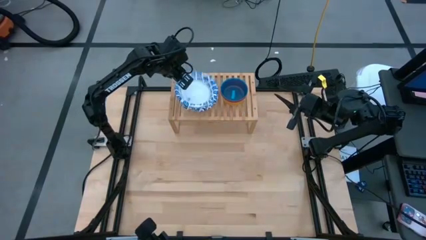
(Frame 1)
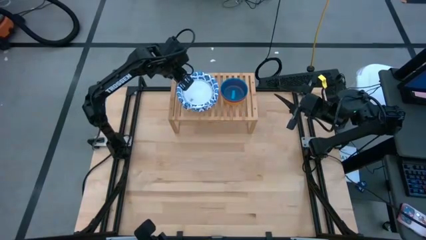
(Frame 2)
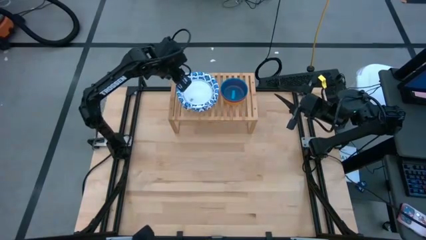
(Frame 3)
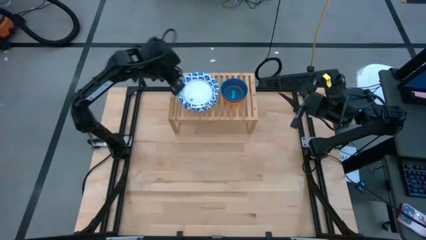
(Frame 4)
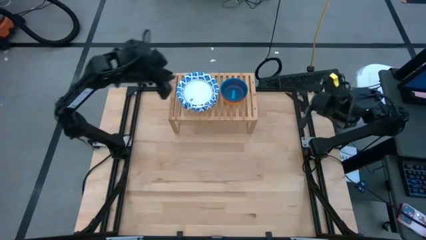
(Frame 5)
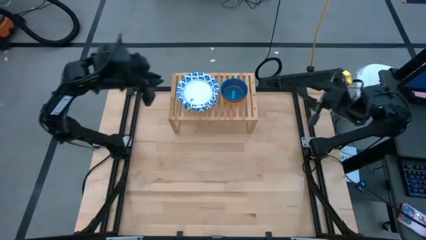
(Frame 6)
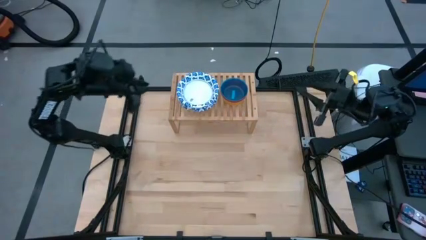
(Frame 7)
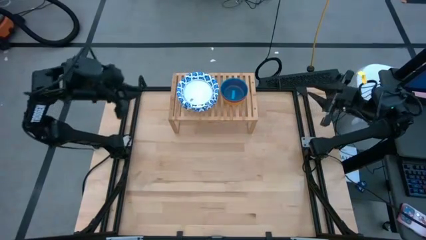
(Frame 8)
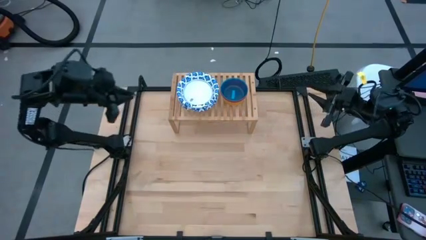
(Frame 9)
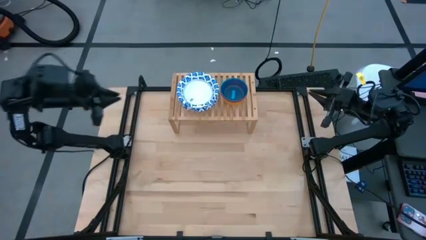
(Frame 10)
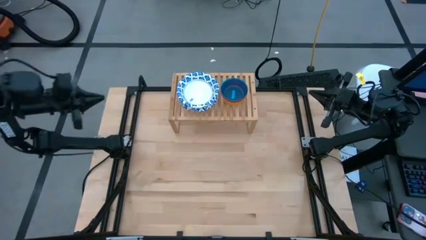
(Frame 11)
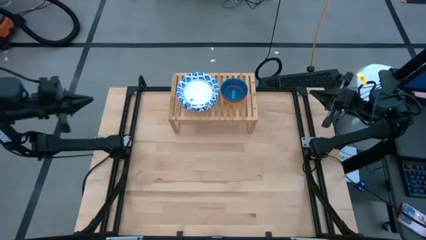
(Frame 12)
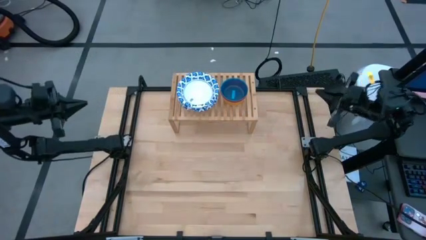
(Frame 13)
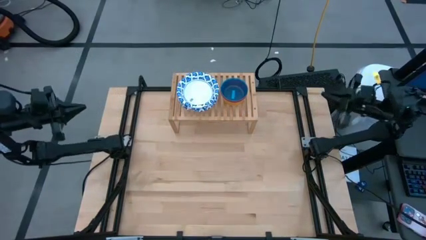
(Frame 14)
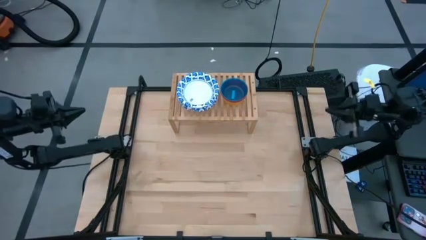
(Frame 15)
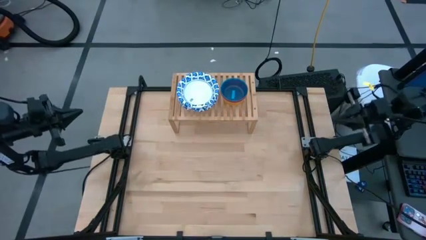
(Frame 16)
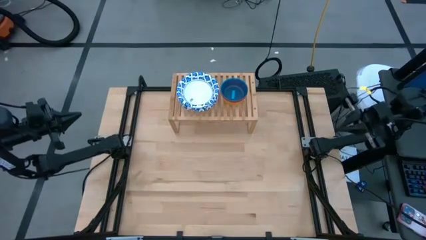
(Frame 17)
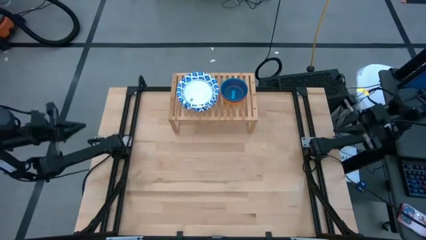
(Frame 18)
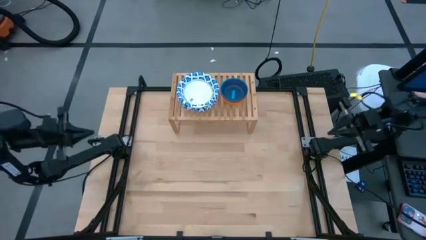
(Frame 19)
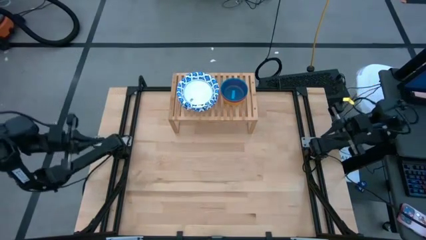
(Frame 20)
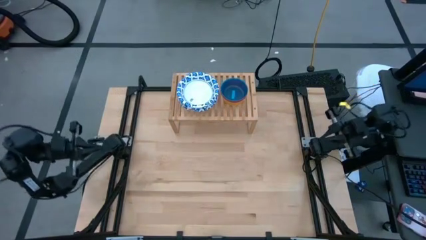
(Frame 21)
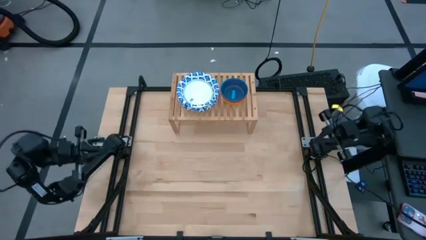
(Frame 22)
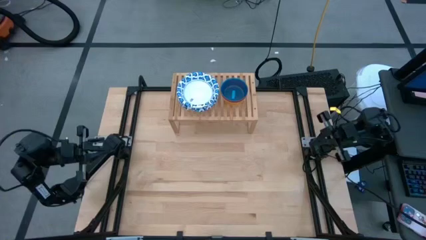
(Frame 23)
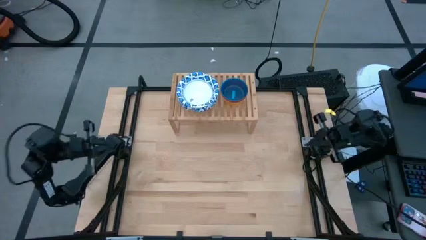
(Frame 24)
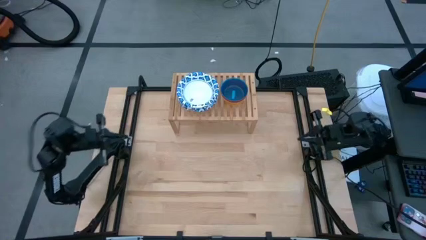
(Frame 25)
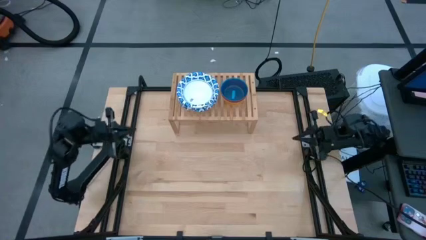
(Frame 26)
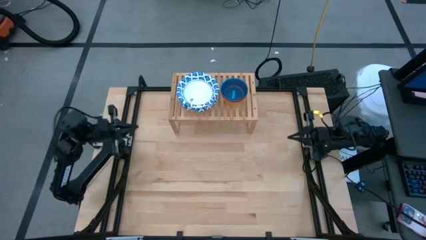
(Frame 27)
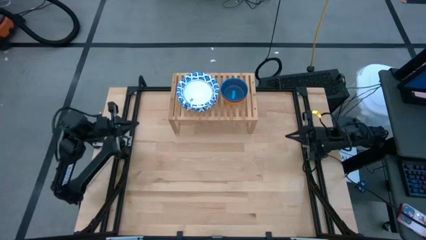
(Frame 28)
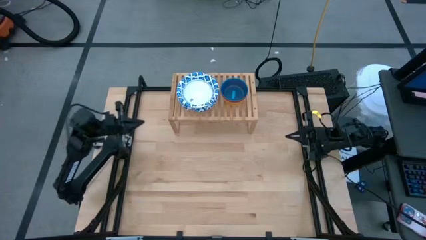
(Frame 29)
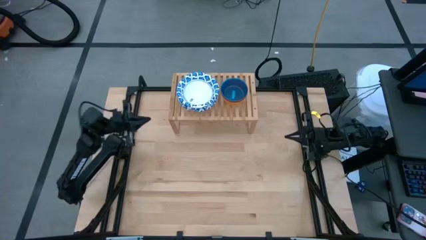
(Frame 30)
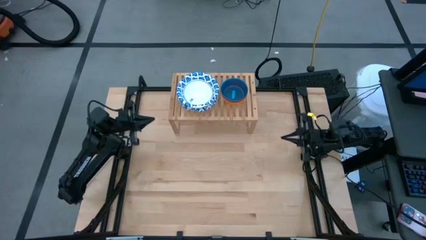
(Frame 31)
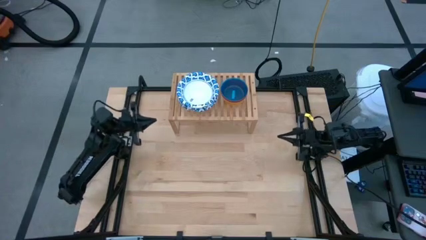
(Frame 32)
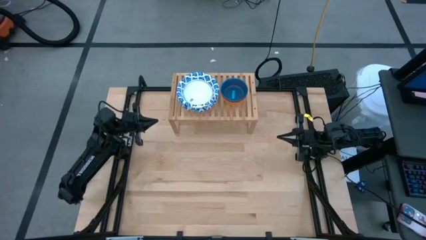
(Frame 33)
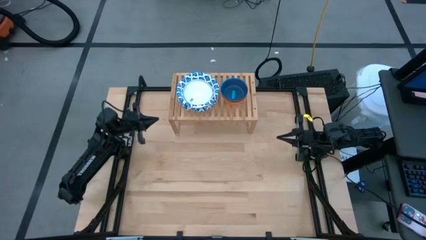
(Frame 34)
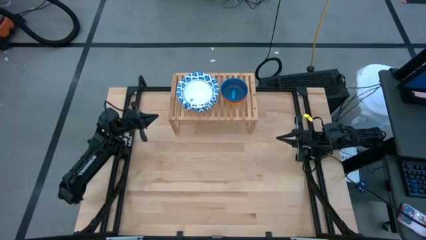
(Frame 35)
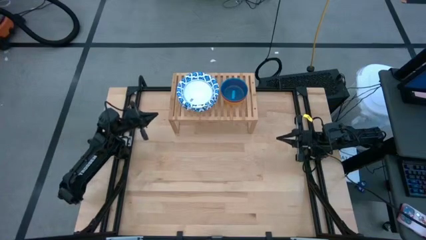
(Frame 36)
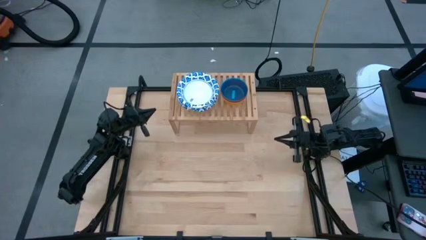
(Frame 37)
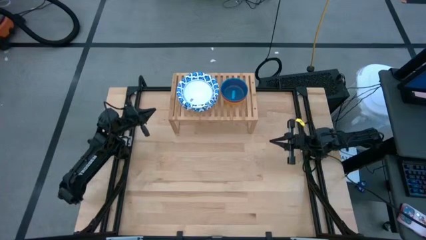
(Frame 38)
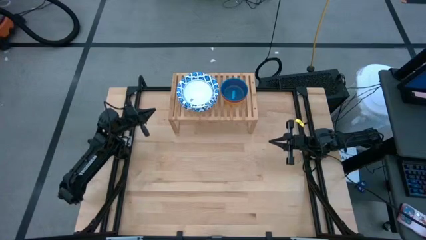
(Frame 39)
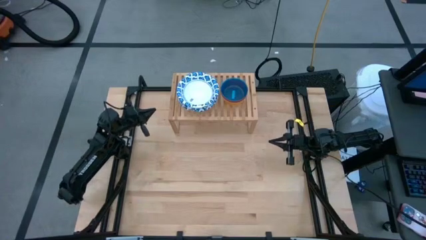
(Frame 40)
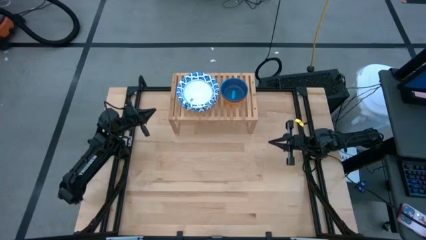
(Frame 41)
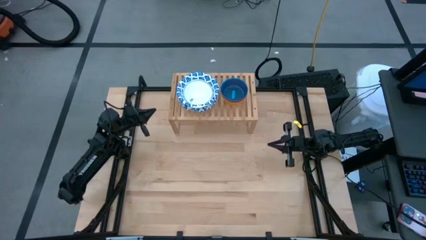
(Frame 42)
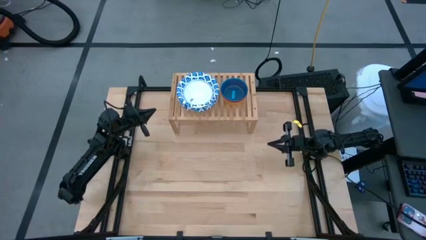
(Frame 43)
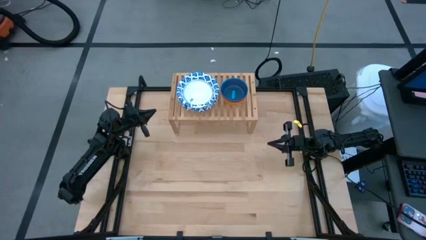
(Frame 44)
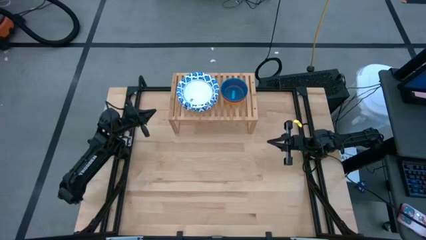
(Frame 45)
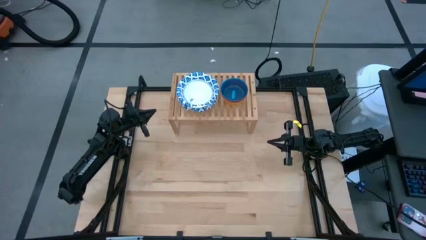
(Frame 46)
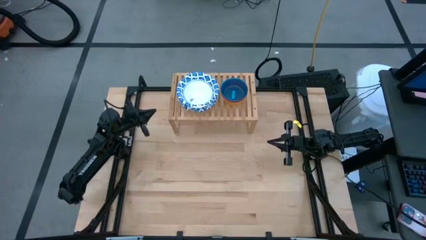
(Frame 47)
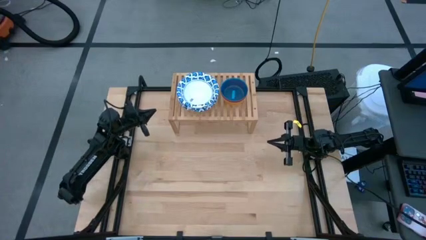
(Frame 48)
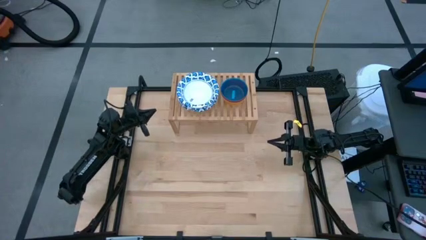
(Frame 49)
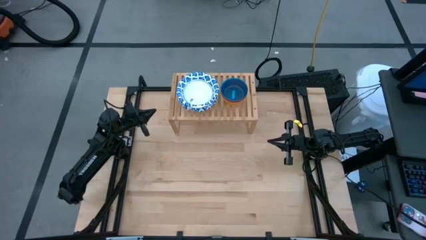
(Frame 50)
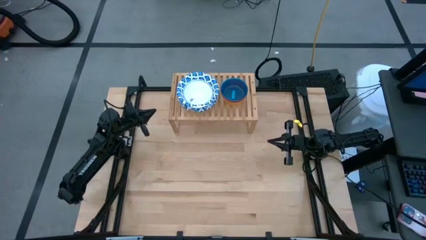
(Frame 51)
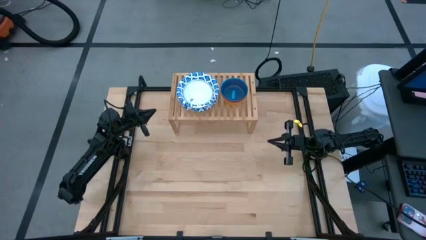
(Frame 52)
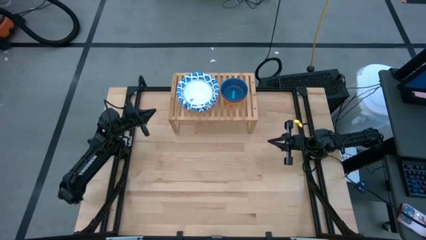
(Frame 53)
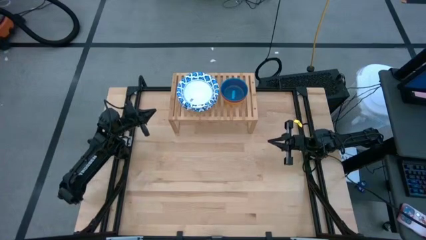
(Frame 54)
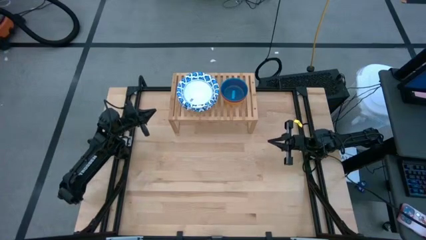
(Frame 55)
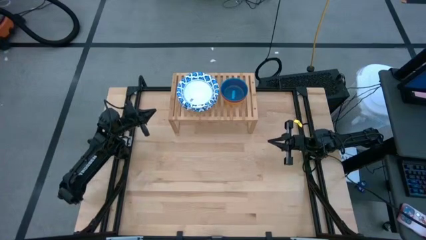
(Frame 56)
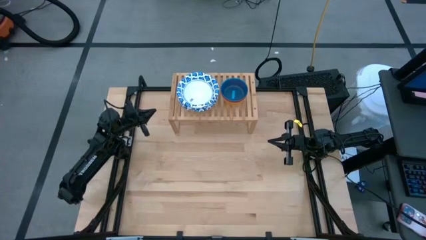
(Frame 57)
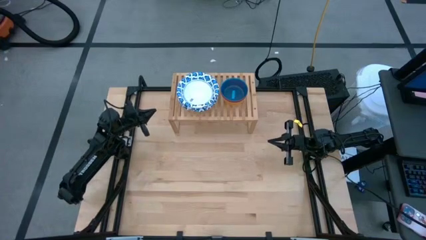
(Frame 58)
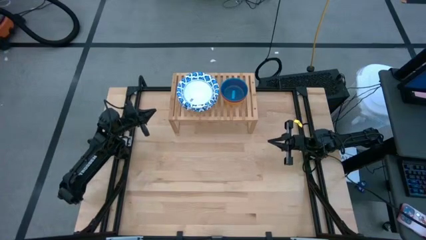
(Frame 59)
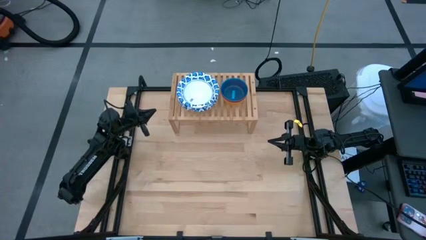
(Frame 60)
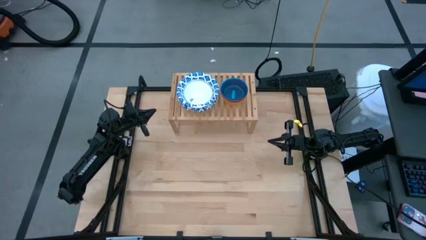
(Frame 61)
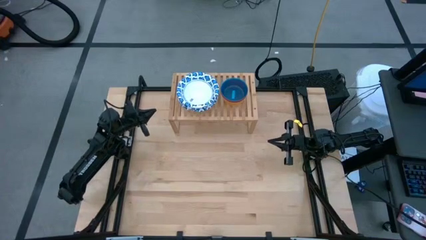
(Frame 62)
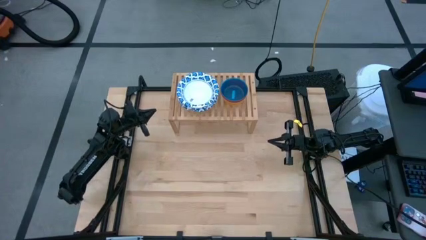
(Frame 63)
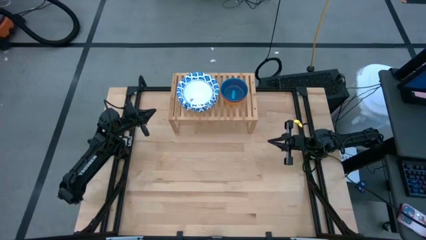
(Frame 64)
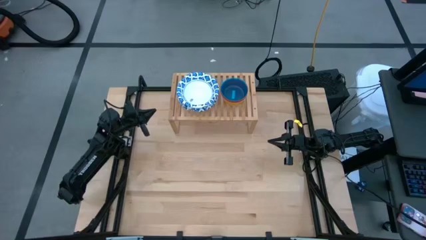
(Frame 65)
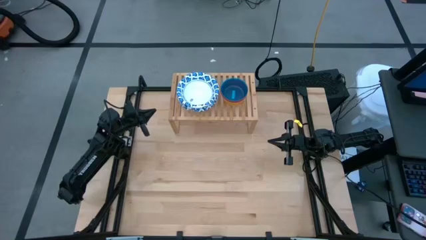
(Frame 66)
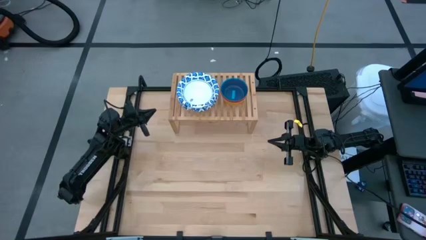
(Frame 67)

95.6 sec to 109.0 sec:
Task: Place and stack bowls onto a shelf
Return to Home Position

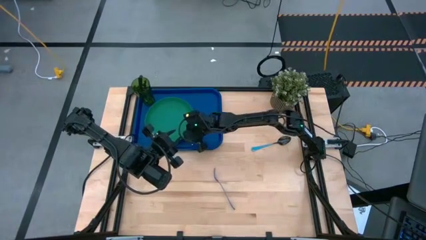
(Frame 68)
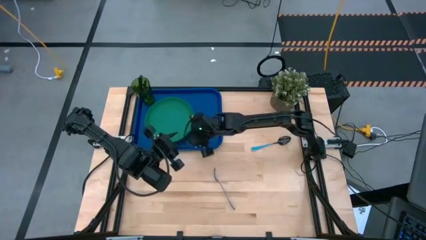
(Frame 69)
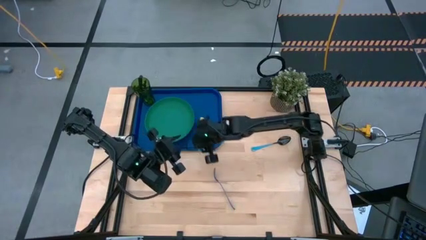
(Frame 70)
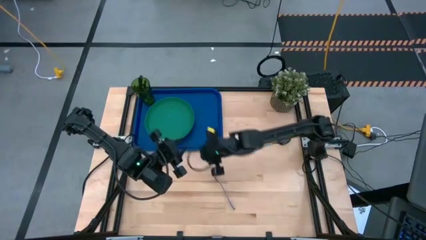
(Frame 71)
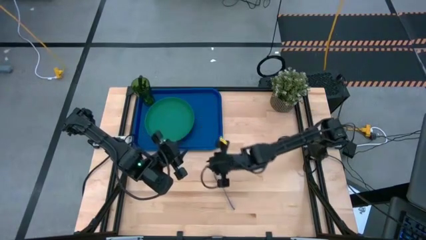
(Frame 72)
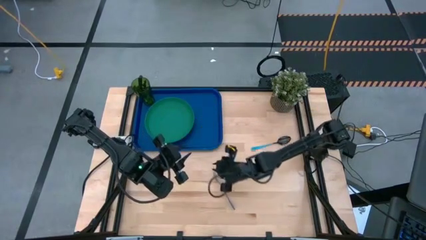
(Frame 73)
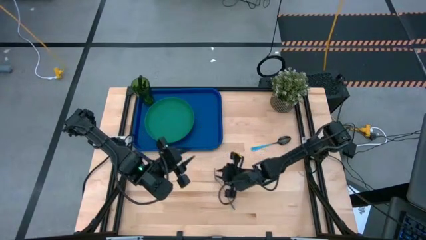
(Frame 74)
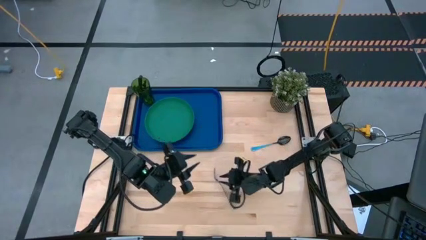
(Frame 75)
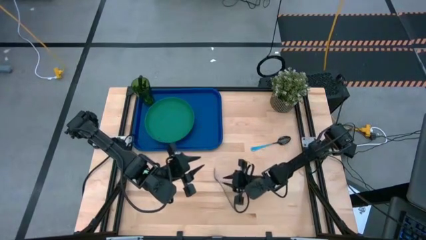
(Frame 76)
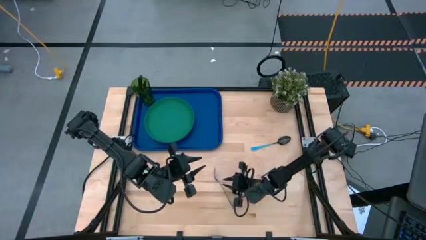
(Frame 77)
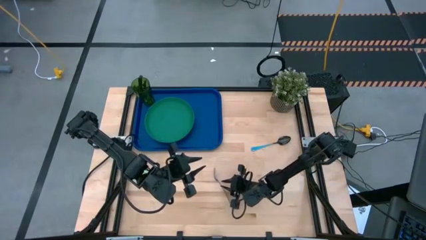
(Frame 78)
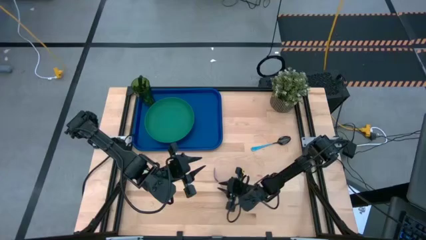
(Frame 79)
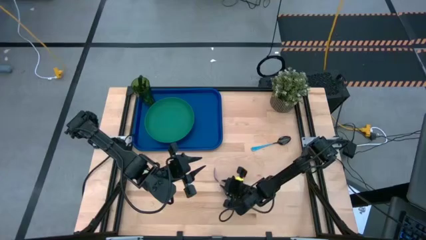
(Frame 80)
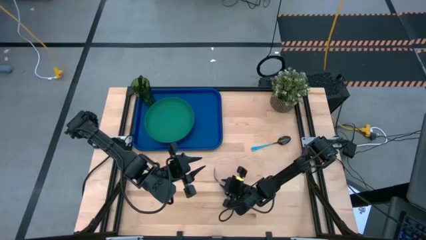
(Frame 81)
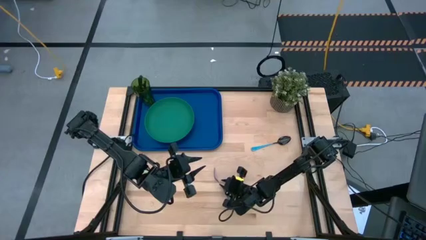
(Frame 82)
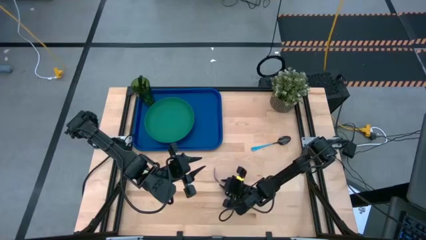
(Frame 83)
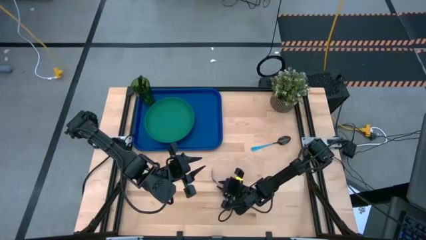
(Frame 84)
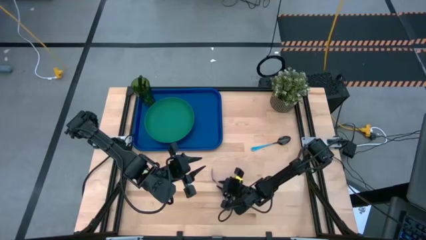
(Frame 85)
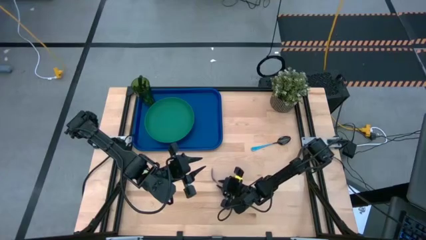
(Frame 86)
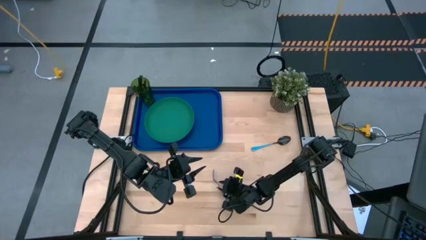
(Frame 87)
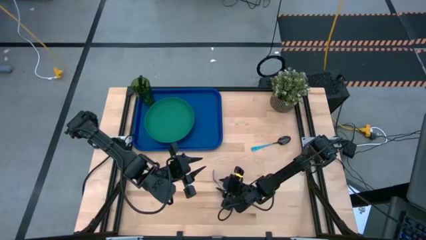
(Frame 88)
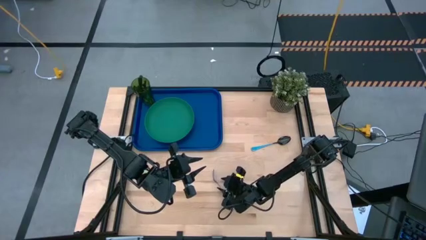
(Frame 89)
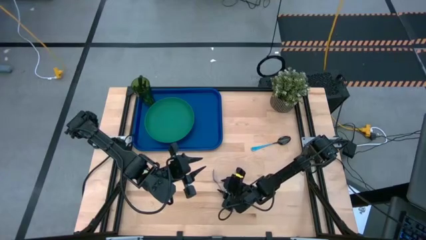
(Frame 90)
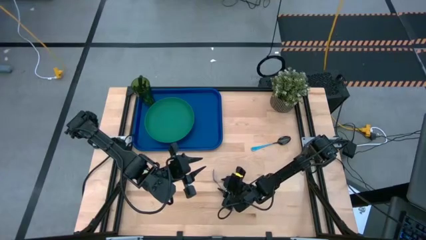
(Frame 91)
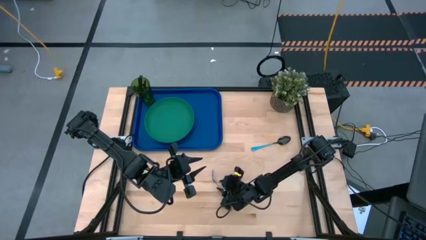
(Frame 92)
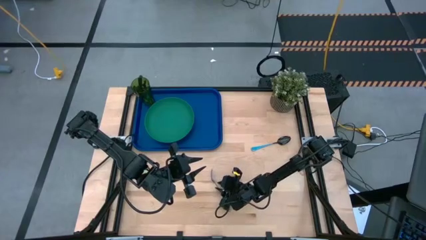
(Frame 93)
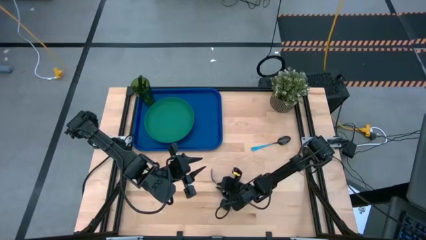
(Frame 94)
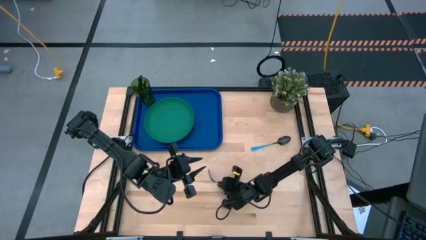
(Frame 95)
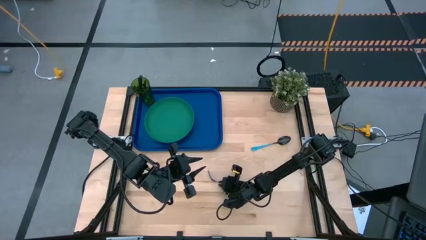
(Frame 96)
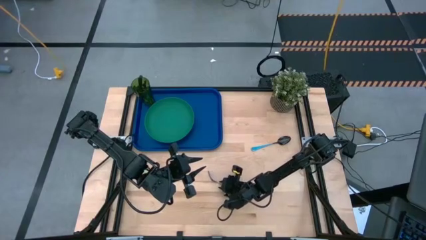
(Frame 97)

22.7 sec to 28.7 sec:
Task: Pick and place plate/cup/fork/spoon on tray
Put the blue fork on the blue serving tray to the right of the green plate
